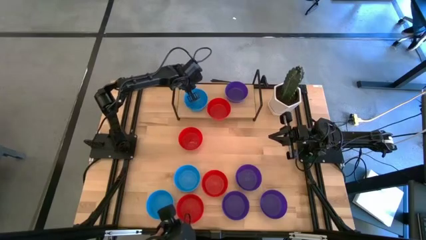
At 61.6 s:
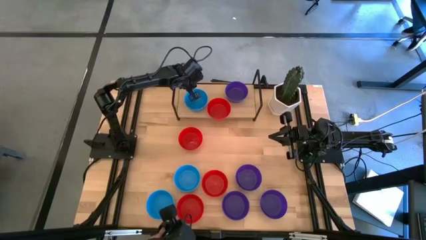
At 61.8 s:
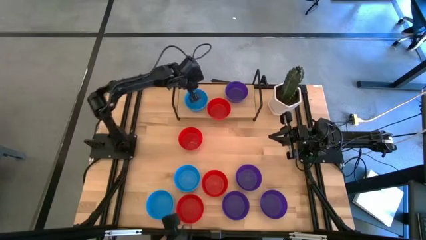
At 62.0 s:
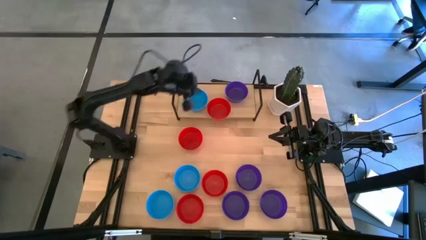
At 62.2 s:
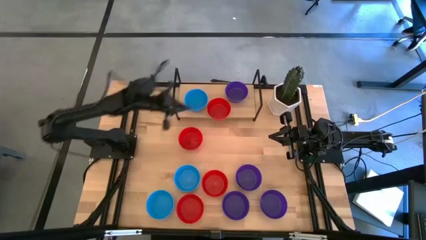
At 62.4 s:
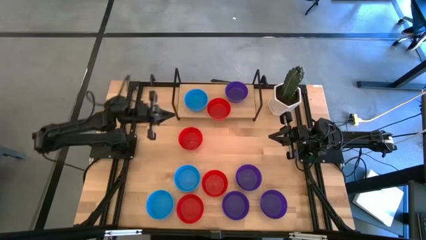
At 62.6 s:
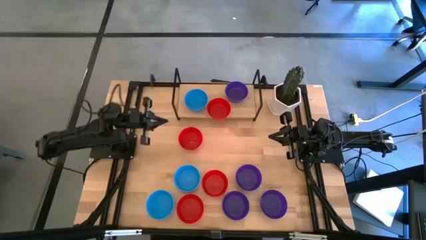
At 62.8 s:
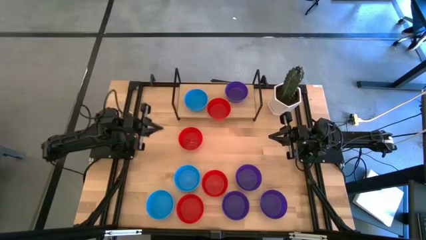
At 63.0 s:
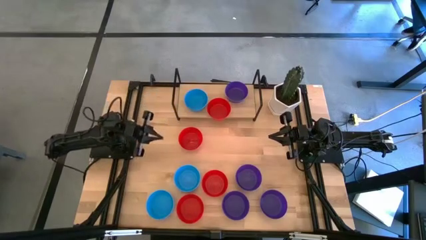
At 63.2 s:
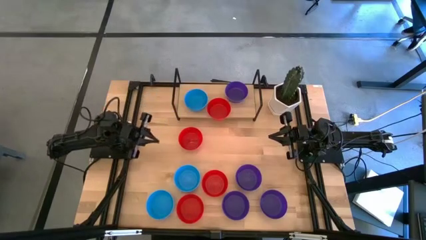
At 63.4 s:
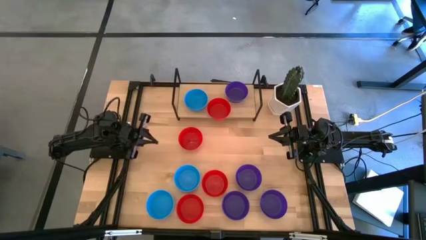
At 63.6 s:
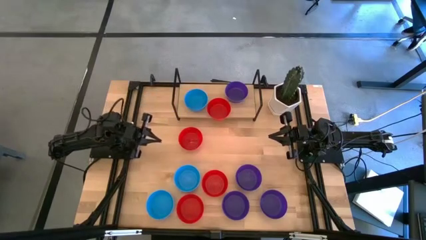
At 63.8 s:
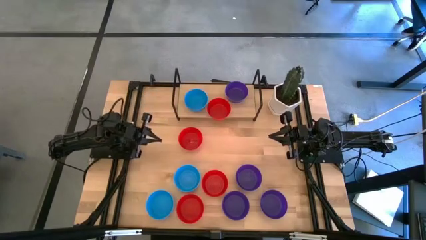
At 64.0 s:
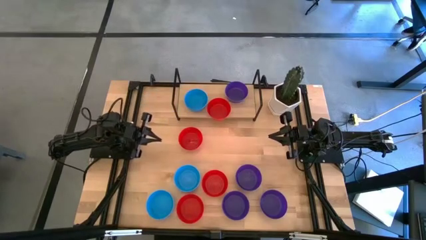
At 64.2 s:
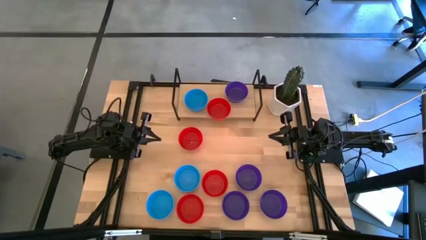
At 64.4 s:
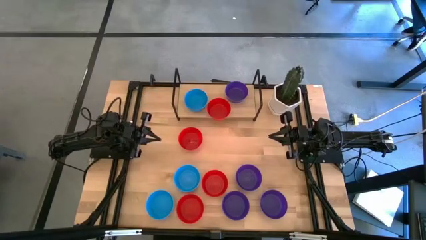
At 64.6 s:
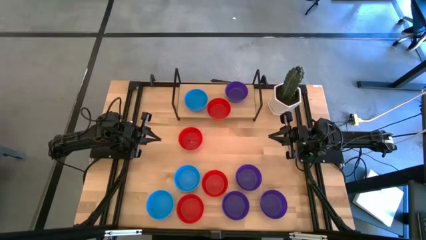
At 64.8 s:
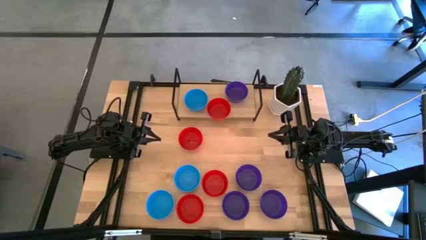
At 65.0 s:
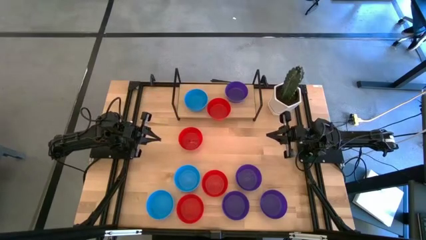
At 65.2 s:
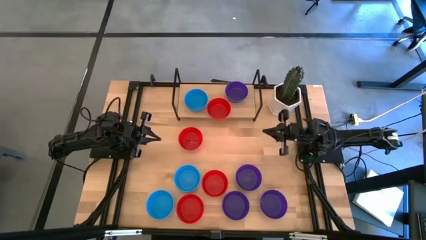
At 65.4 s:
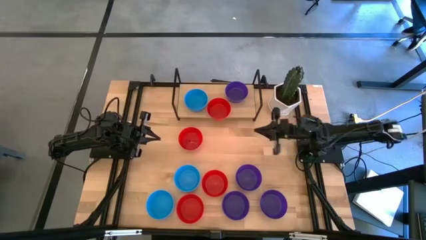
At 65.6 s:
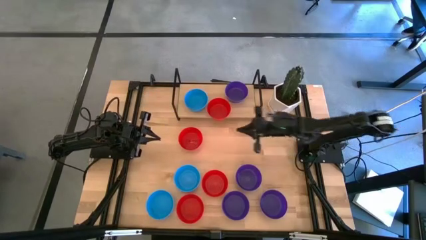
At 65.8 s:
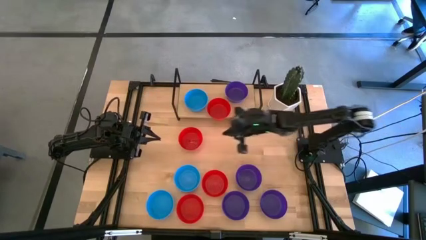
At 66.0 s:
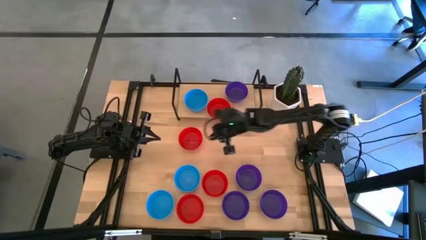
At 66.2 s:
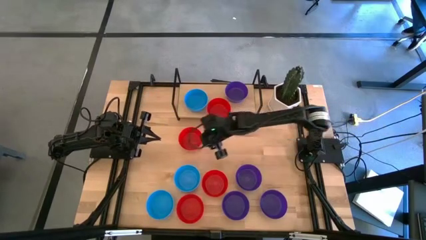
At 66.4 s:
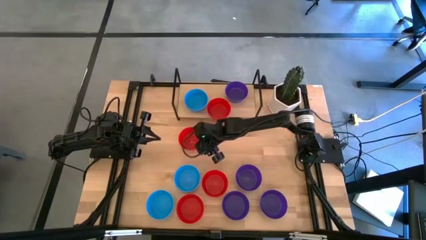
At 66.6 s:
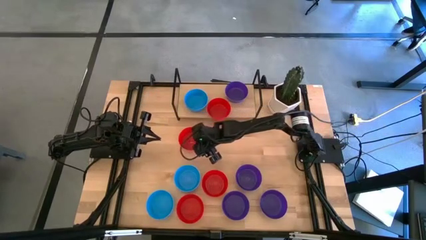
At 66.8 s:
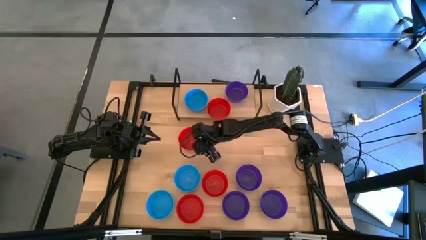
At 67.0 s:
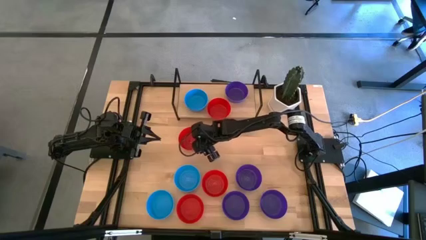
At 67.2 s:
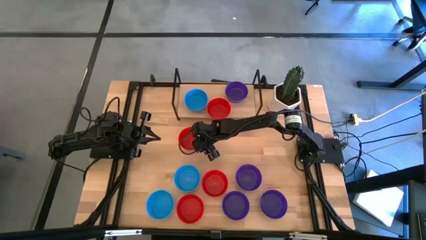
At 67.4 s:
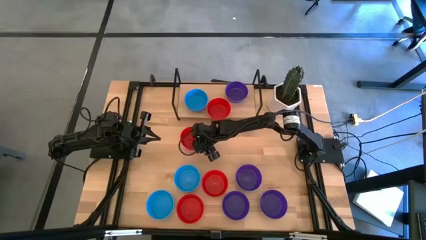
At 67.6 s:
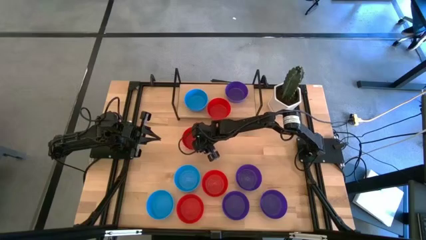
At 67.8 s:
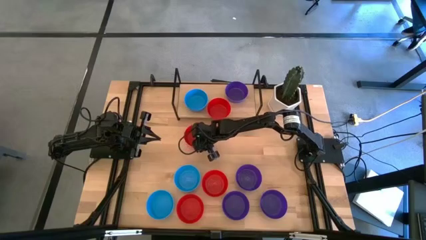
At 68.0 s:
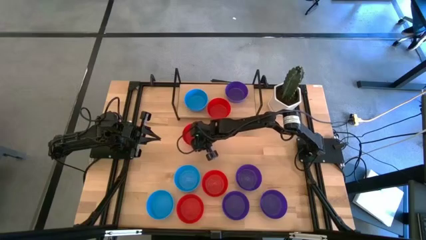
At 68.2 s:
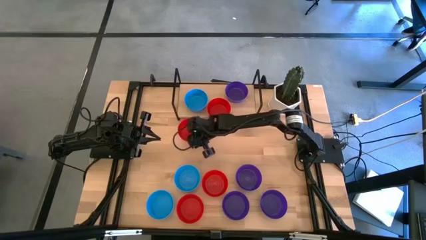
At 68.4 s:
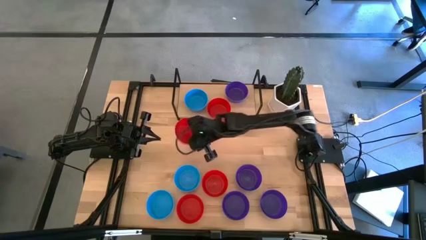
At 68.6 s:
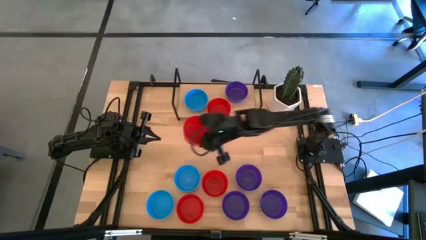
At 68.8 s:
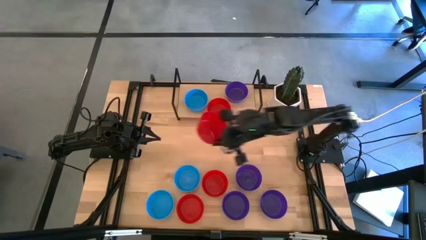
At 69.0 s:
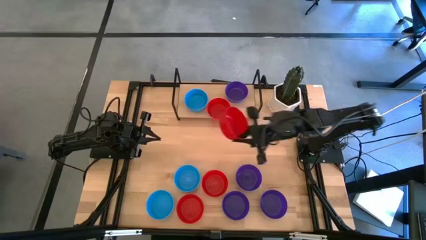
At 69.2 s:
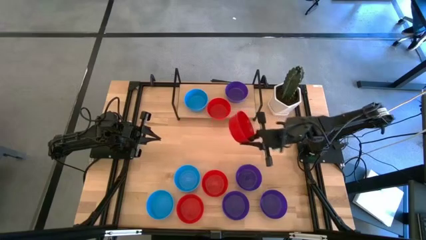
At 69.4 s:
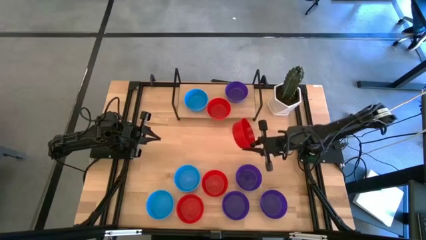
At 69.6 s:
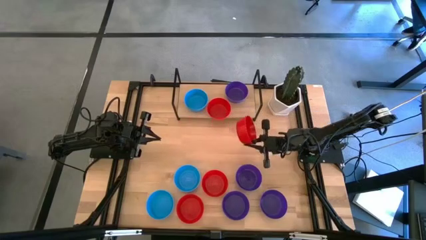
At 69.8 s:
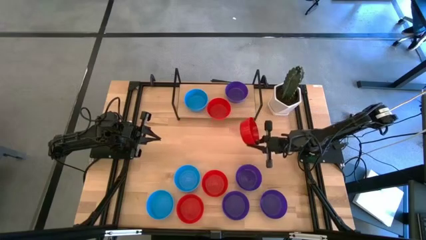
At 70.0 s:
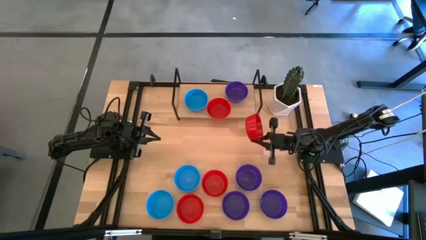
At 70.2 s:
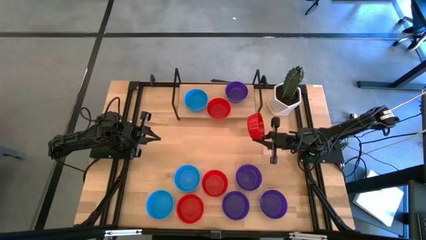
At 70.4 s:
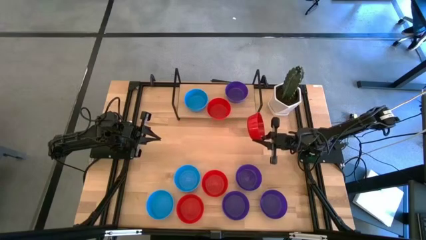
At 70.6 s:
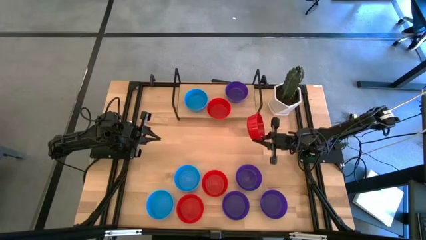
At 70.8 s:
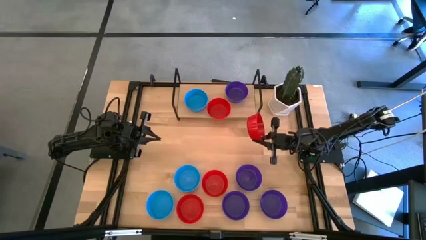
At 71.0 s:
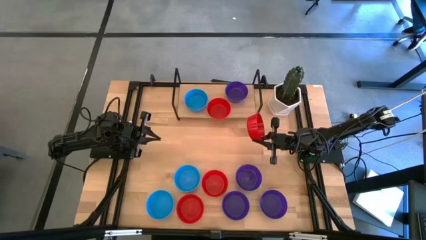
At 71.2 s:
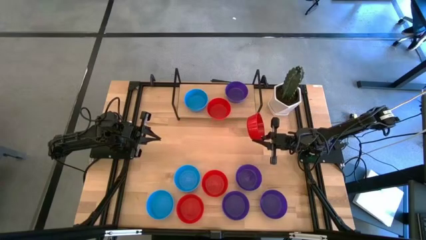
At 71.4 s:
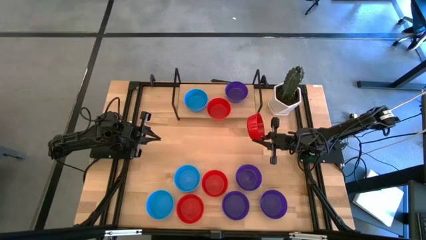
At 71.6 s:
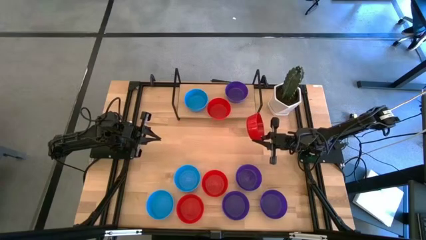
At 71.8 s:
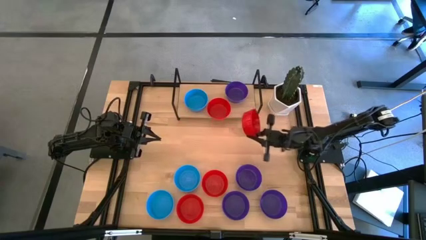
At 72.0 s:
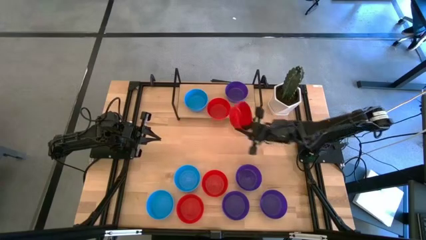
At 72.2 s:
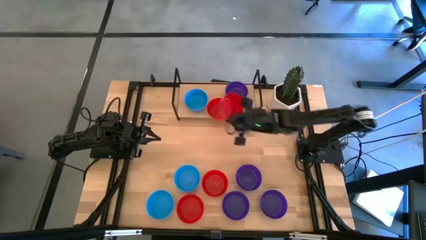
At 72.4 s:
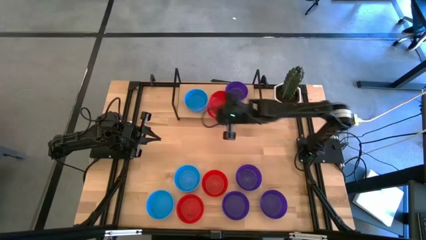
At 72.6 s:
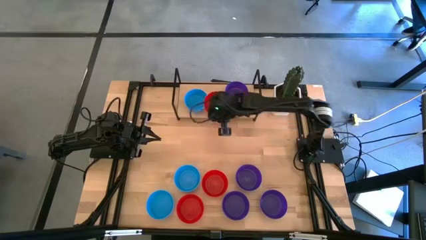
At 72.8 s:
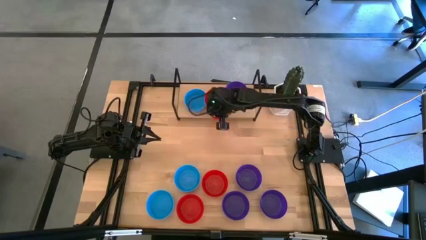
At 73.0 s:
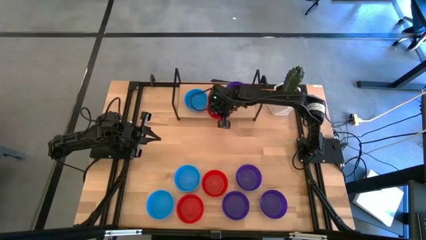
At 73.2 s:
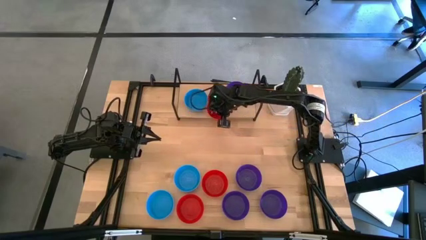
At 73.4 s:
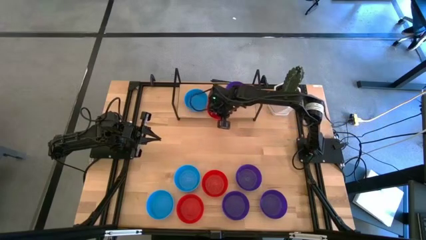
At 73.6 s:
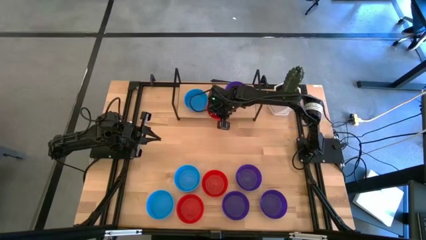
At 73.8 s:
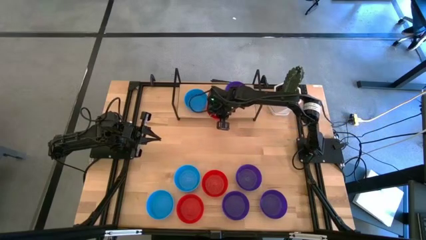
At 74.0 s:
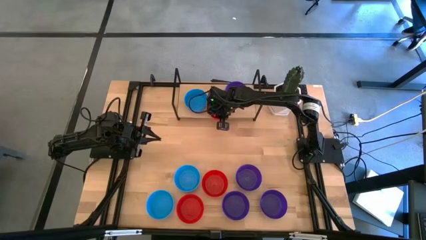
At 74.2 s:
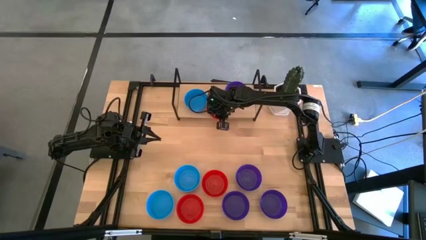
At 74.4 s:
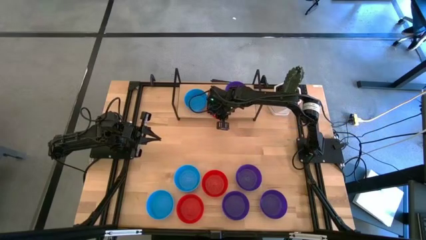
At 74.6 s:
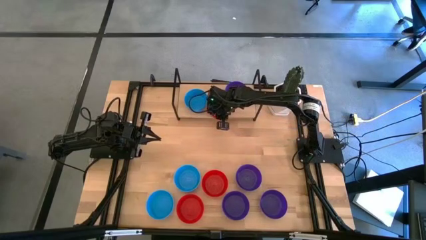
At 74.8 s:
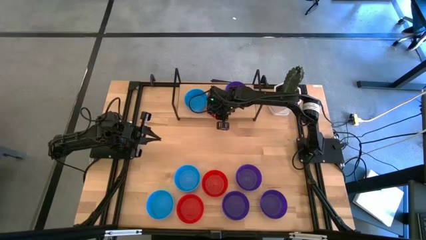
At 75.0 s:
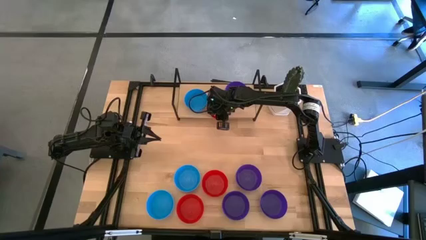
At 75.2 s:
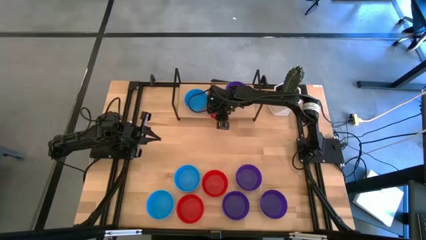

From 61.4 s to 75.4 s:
Task: Pick & Place Mini bowls
Stack the red bowl on the red bowl on the shelf

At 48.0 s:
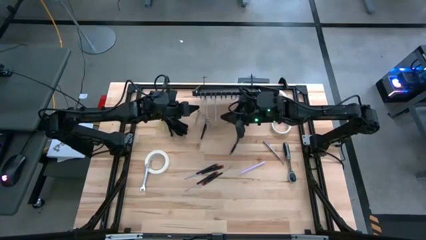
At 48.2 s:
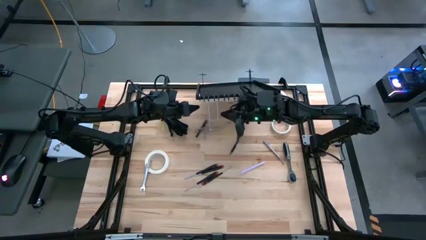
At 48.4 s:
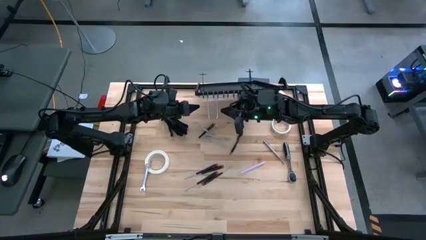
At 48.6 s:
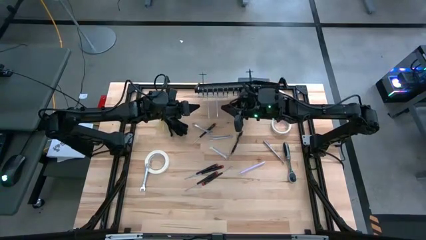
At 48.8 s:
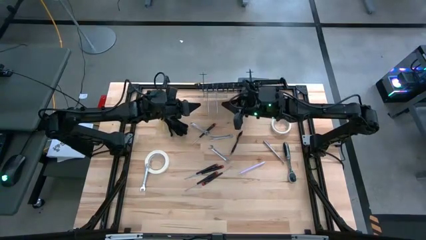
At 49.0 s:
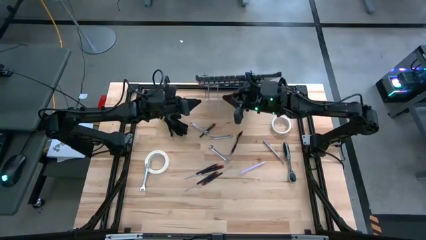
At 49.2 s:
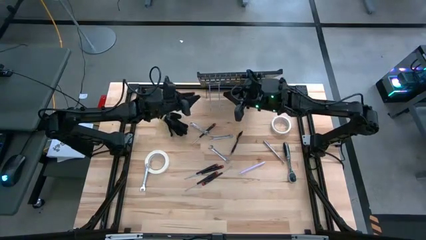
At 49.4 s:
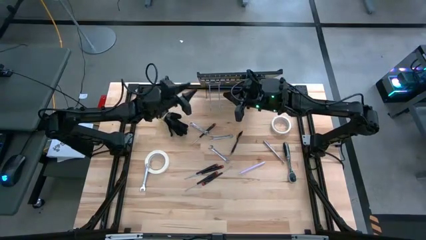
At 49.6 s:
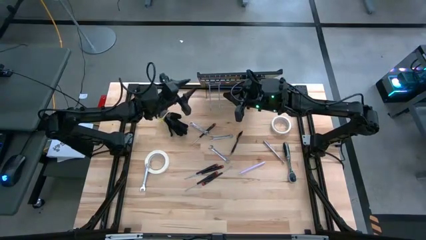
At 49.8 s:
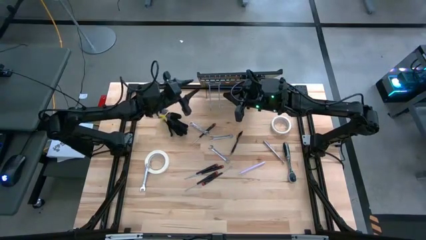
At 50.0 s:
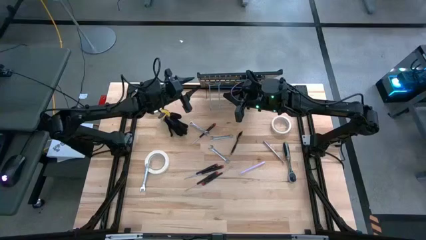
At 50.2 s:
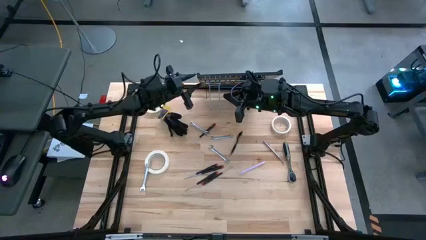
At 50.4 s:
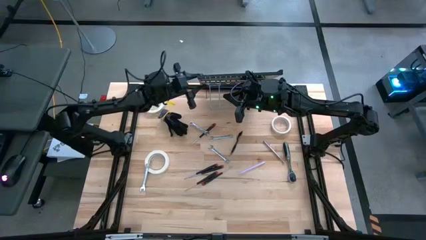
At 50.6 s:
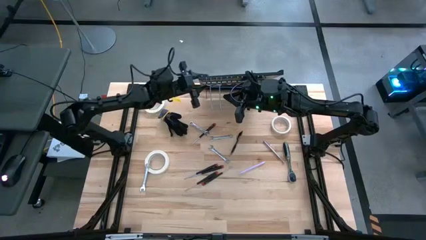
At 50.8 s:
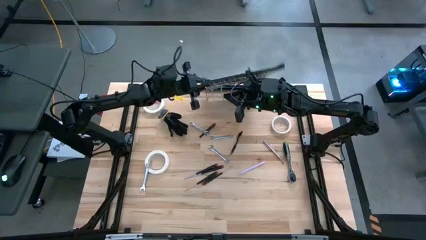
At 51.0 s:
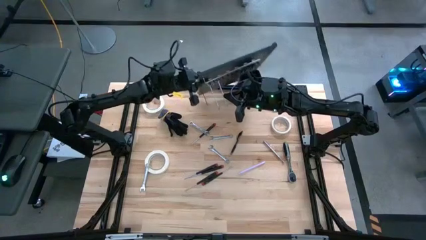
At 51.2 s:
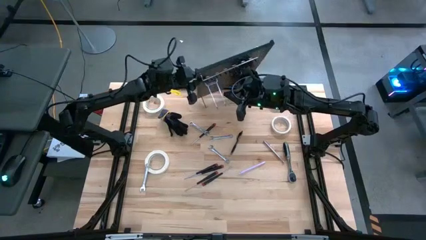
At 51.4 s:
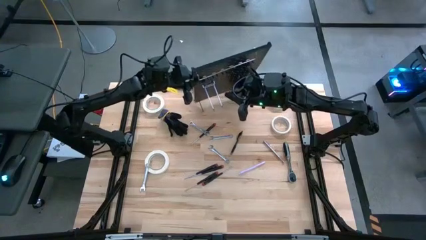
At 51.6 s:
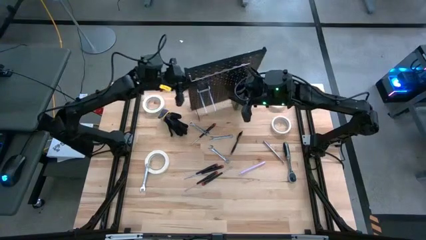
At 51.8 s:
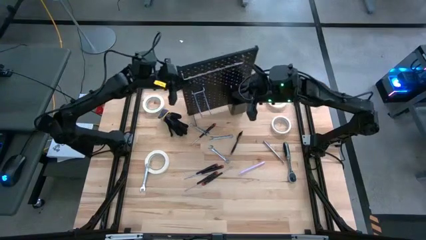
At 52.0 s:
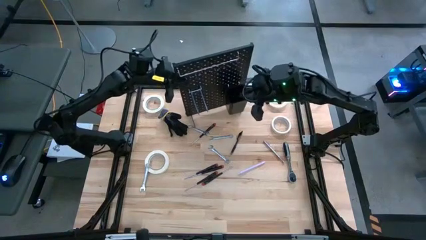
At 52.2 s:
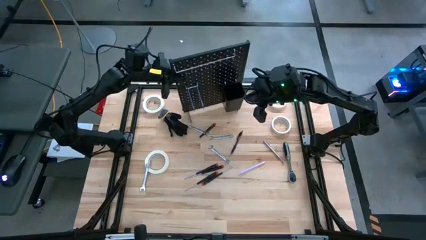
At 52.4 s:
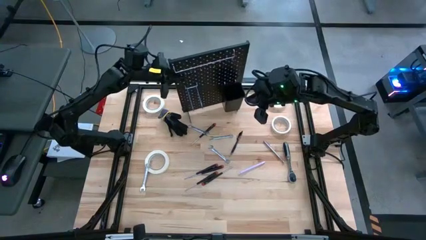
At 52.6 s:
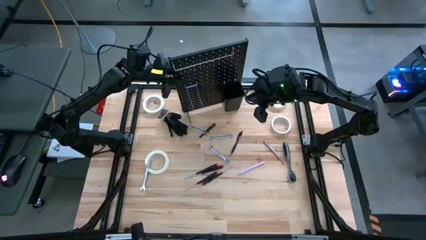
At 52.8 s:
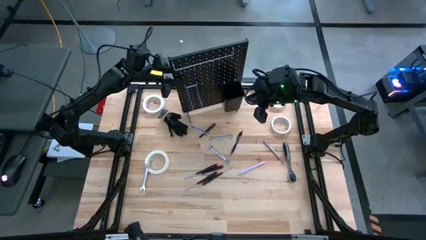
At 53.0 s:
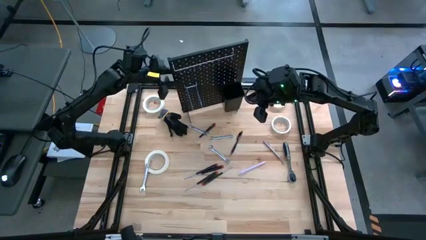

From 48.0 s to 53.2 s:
Task: Hang tools onto peg board
Adjust the peg board
